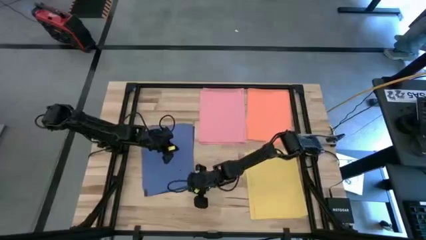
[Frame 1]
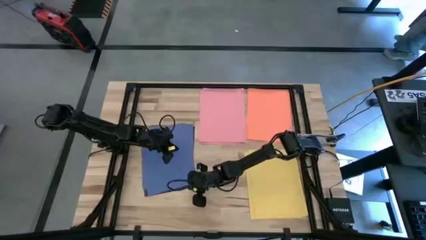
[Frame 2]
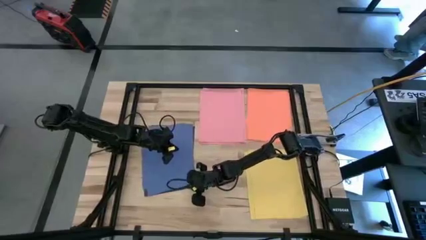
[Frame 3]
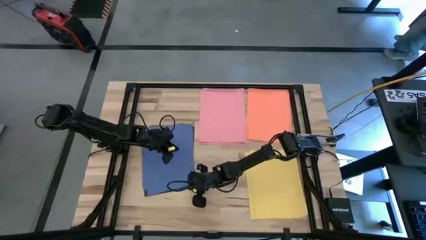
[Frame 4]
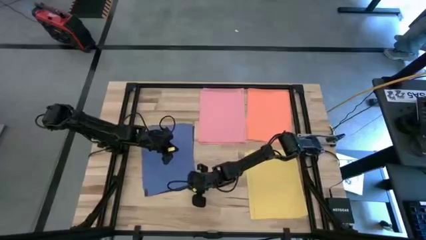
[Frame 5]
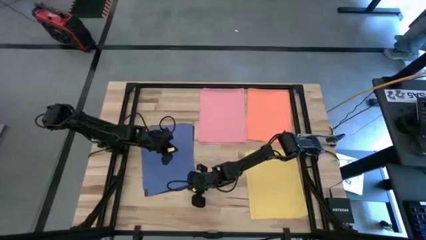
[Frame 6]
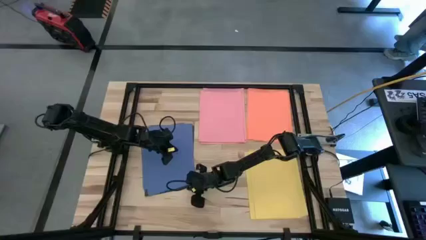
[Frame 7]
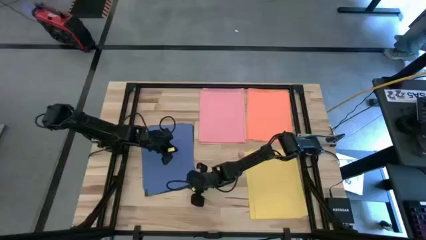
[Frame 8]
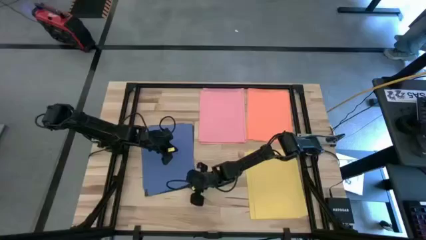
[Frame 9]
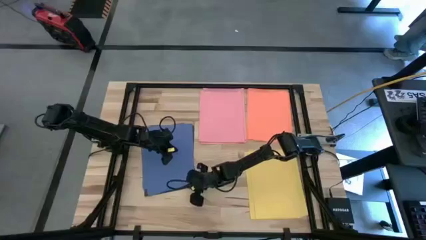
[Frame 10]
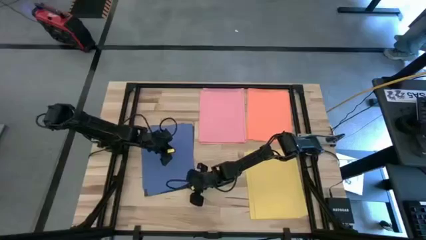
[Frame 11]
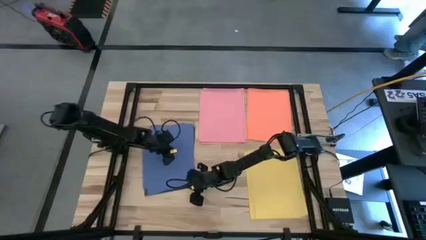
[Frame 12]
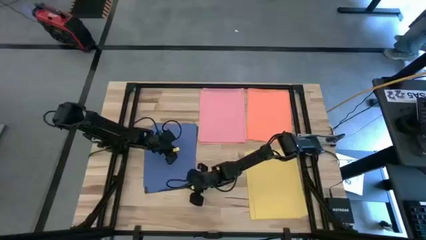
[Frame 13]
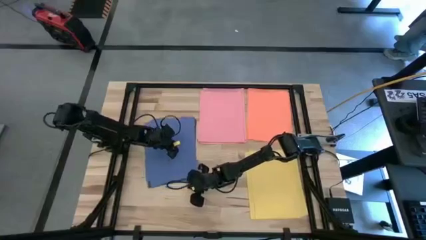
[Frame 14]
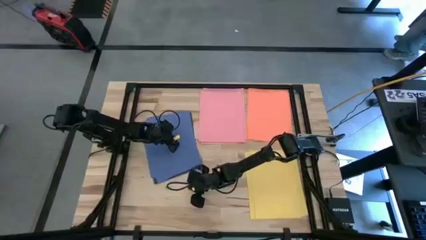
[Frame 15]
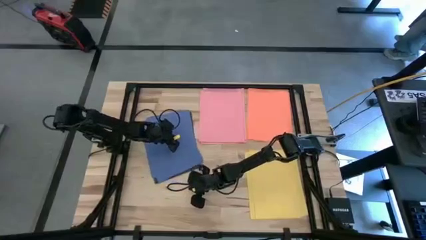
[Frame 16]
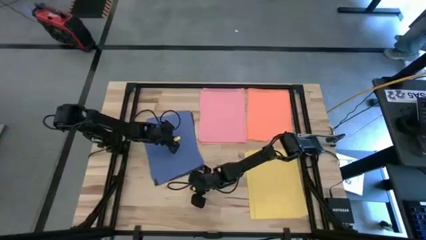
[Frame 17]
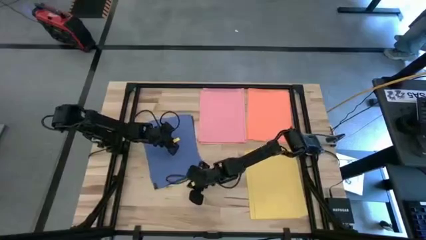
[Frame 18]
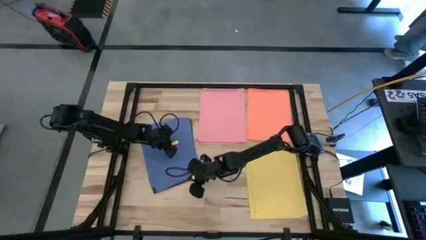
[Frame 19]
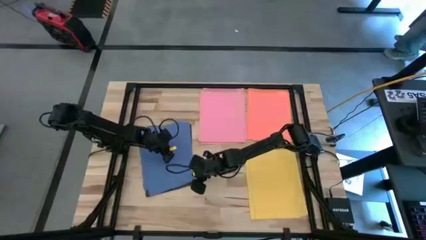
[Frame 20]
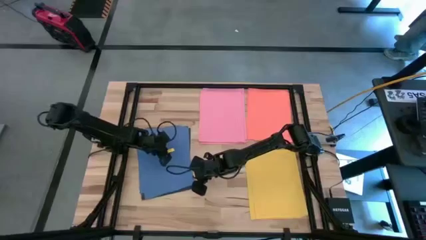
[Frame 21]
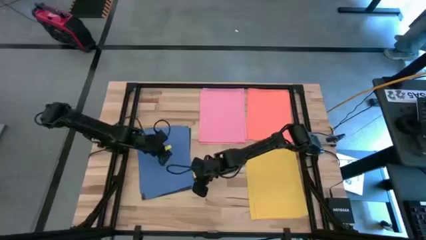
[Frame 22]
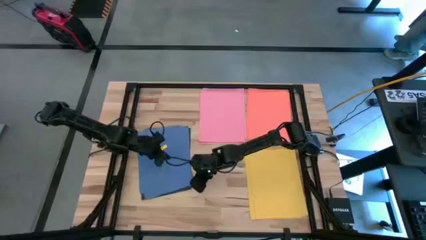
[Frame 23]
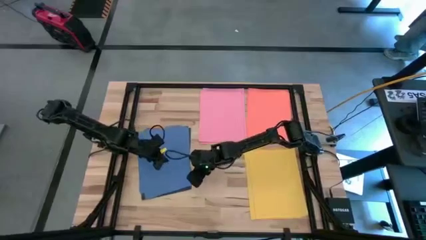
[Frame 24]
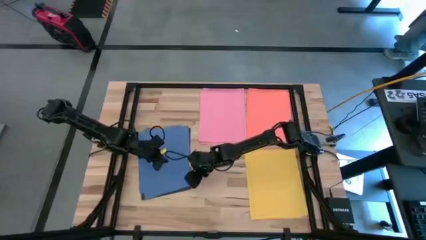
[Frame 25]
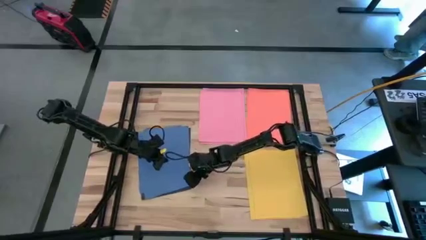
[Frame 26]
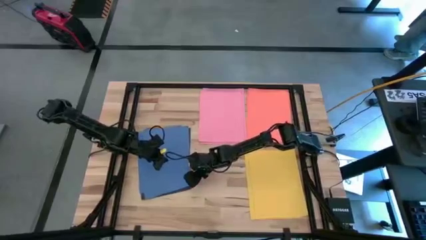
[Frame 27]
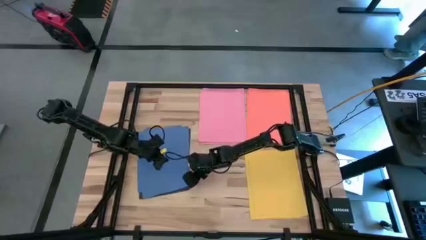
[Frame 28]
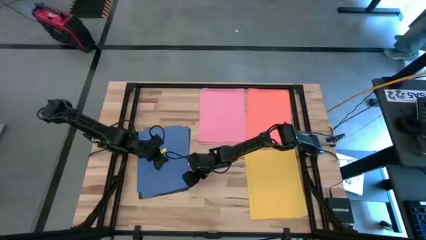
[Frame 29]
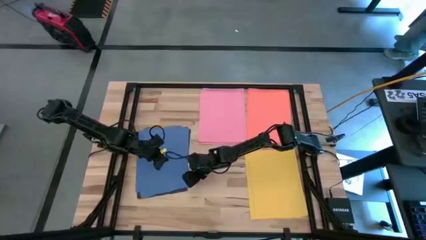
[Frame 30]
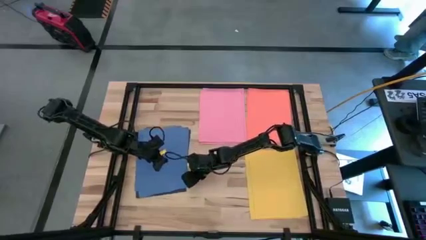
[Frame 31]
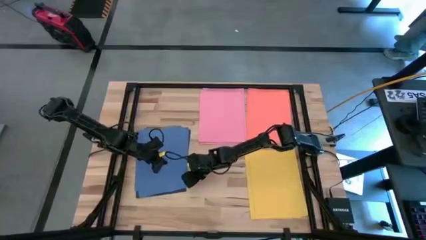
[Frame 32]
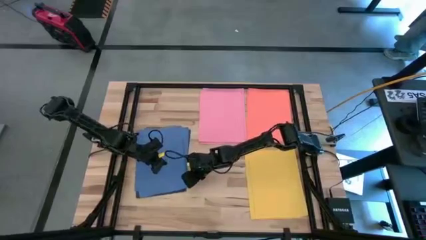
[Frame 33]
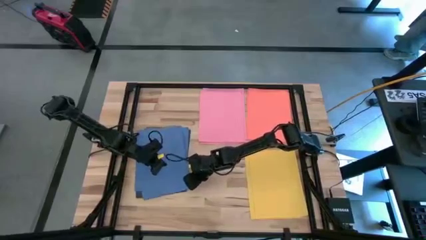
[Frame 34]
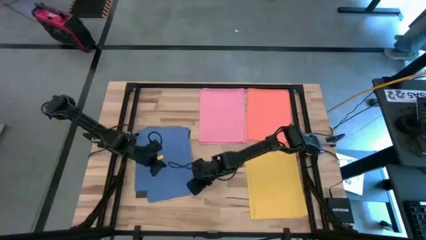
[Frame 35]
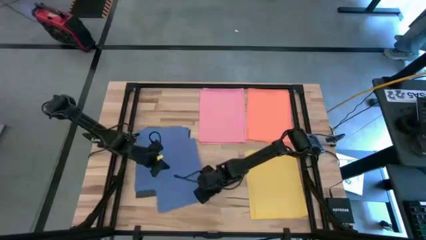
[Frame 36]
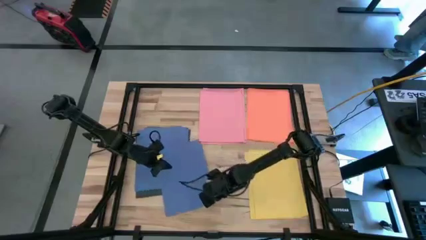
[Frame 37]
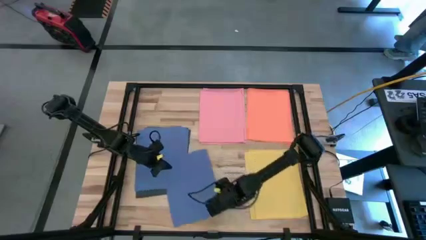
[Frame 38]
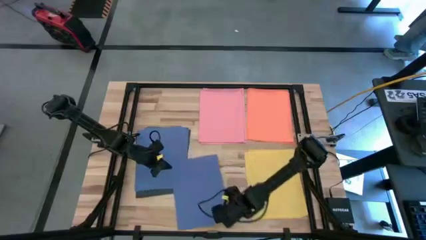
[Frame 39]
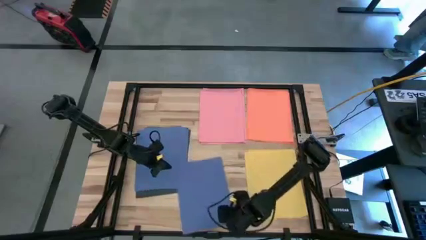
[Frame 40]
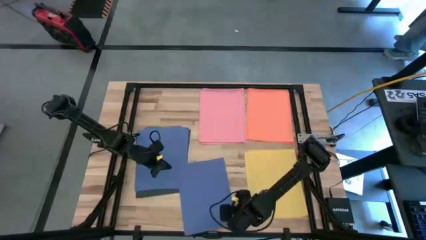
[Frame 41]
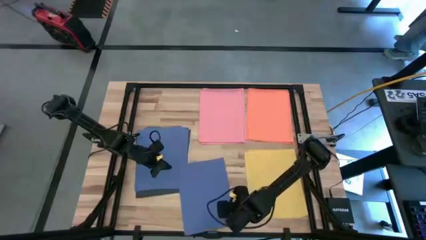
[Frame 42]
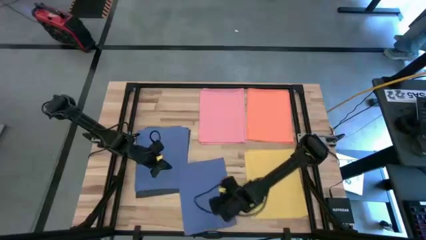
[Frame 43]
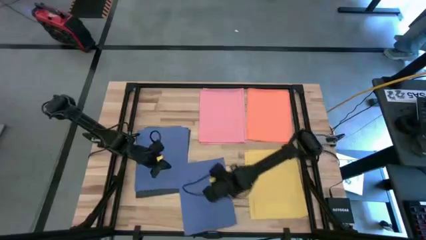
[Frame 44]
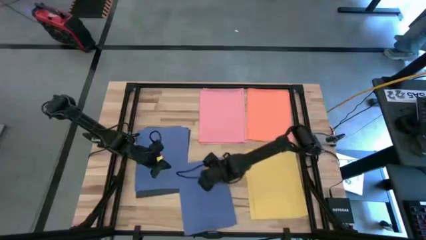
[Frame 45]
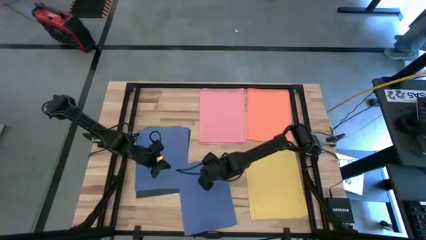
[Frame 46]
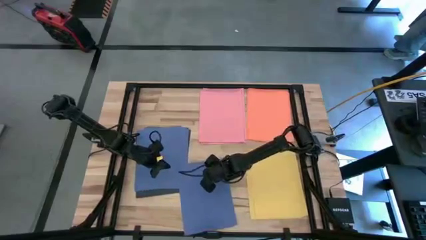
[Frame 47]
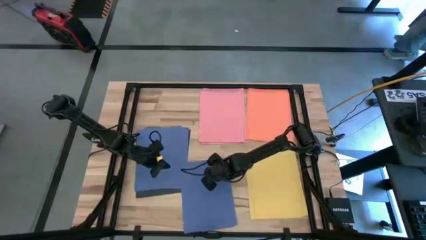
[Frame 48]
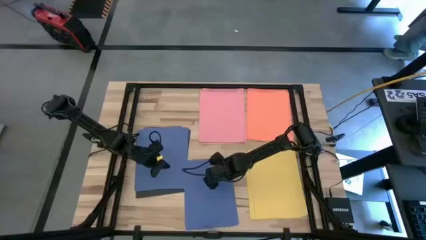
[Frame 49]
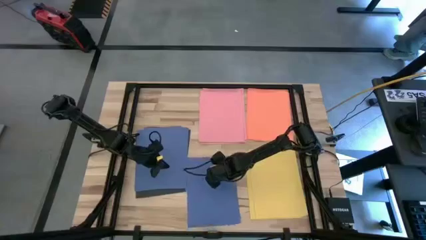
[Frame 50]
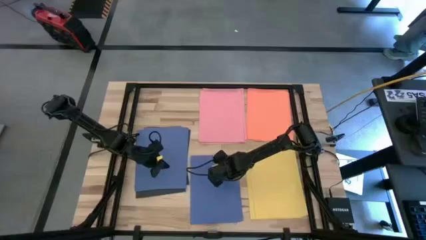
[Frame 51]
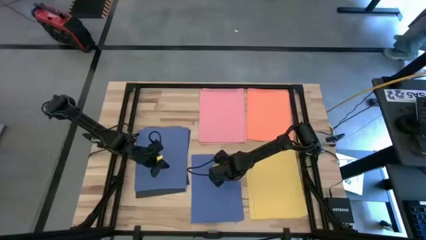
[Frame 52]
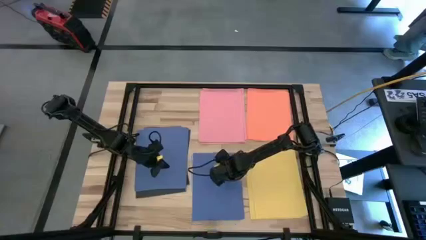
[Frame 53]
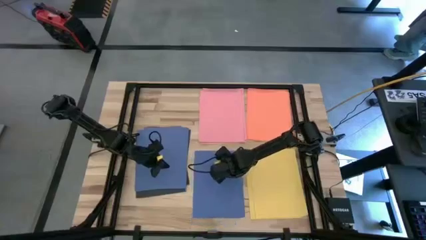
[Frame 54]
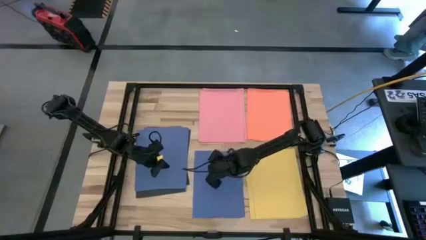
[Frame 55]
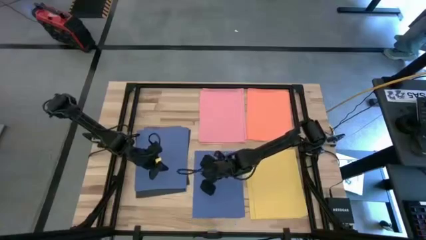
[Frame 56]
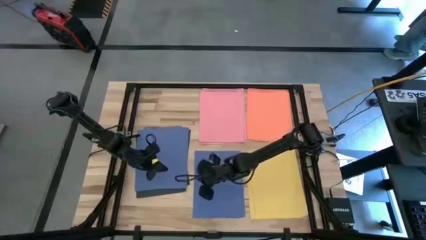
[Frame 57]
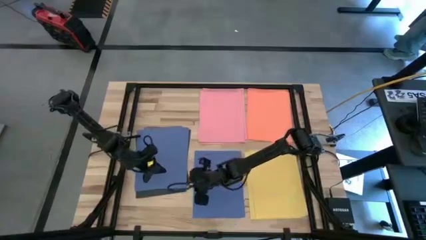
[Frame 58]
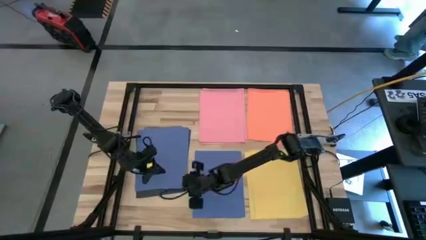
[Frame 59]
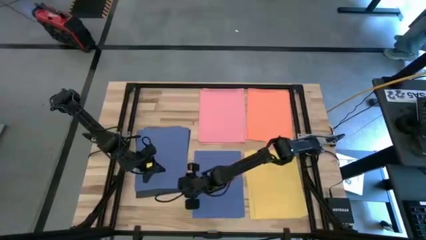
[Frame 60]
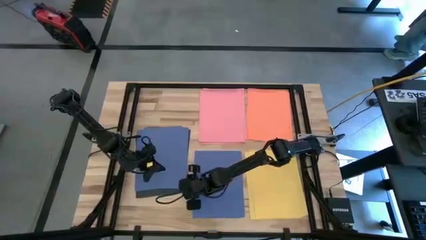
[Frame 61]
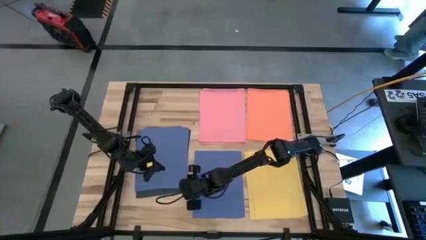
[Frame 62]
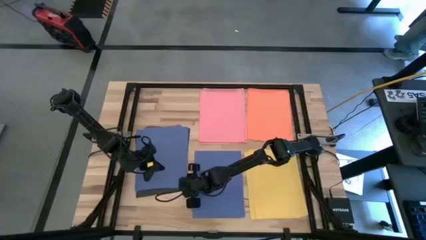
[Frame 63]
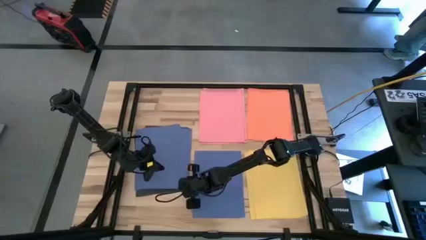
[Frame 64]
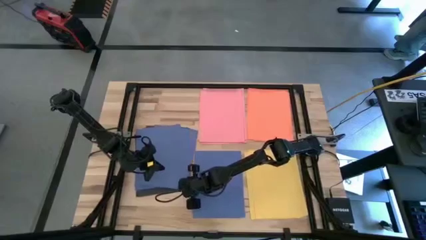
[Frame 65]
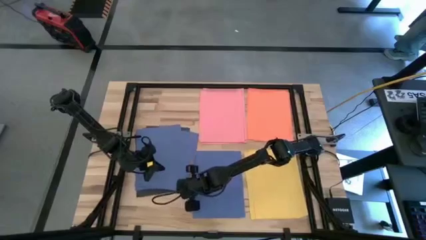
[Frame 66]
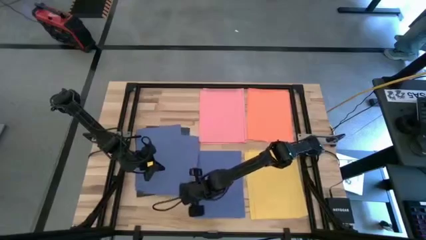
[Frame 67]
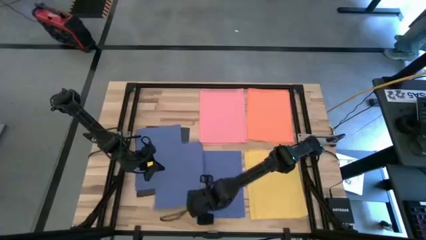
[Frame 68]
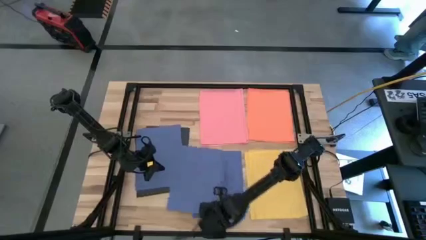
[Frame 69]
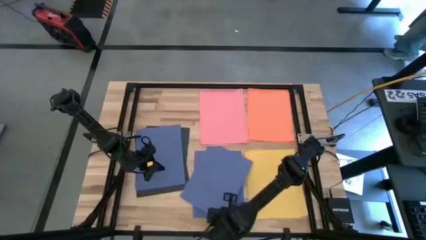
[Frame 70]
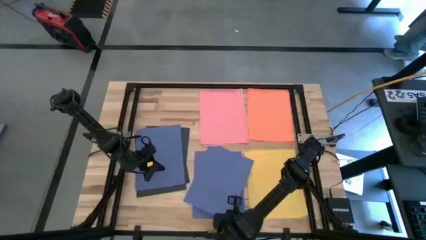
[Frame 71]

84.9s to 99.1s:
Task: Organize paper
Put all of the blue paper at the lower center of the table

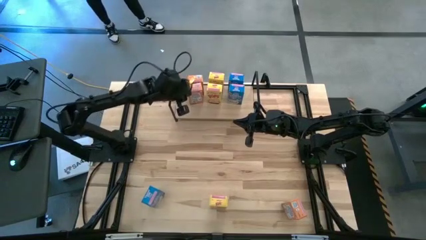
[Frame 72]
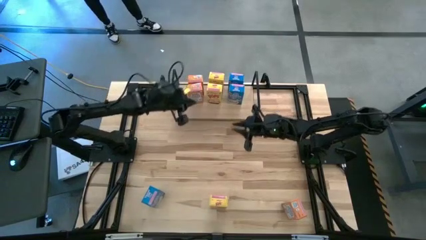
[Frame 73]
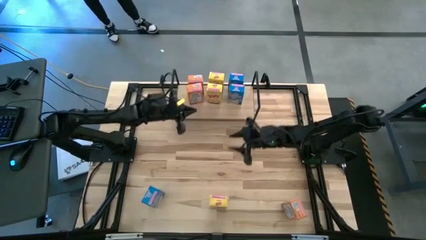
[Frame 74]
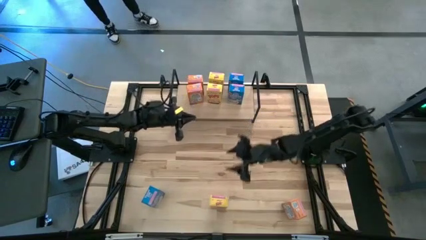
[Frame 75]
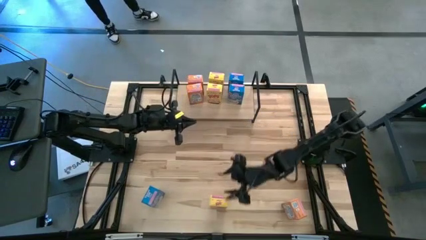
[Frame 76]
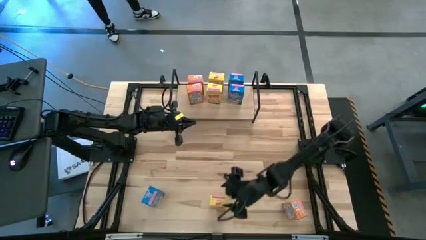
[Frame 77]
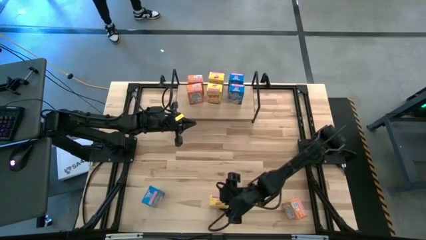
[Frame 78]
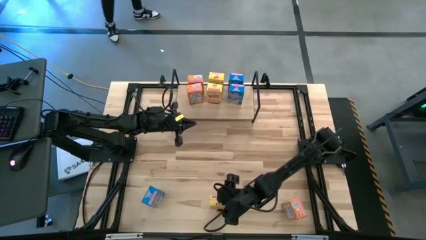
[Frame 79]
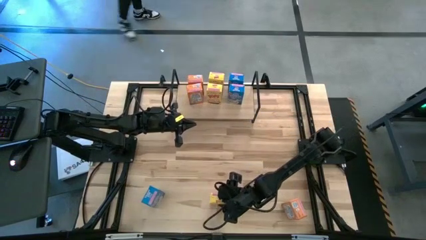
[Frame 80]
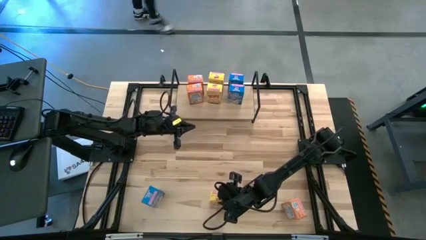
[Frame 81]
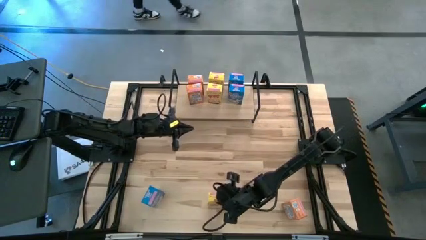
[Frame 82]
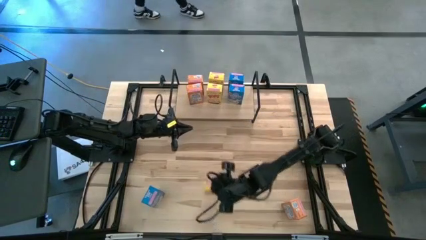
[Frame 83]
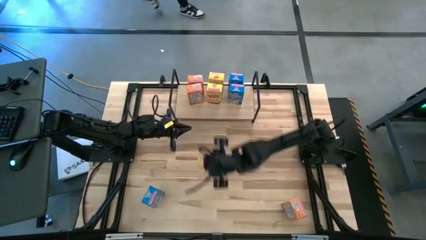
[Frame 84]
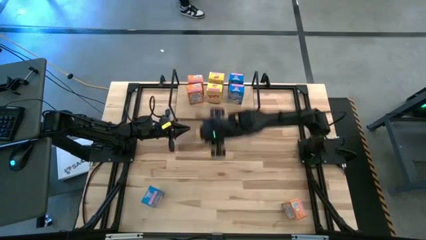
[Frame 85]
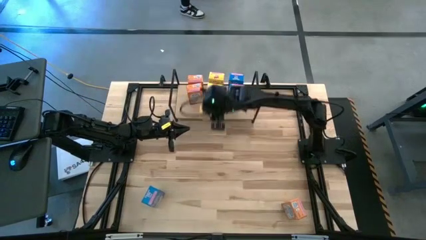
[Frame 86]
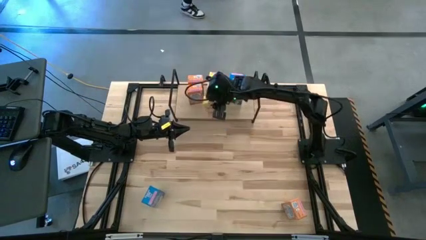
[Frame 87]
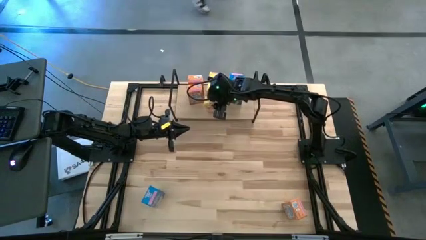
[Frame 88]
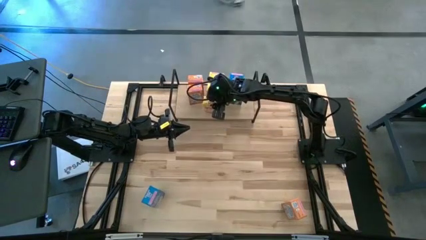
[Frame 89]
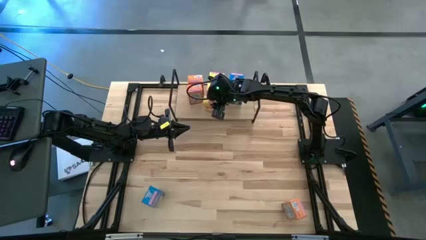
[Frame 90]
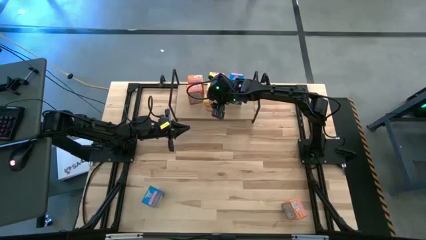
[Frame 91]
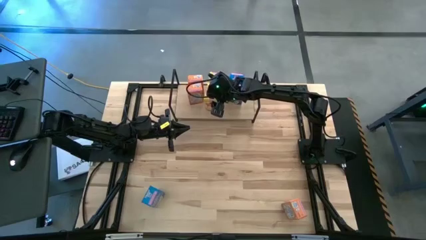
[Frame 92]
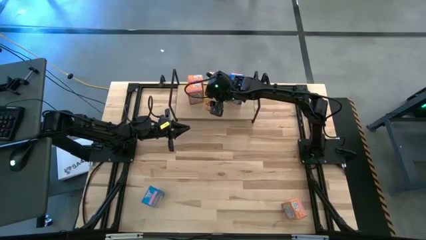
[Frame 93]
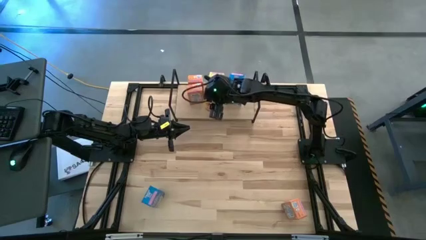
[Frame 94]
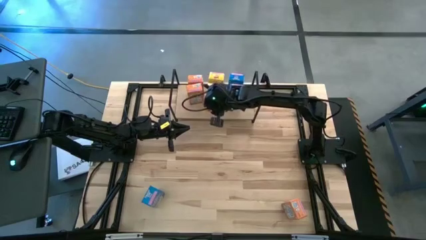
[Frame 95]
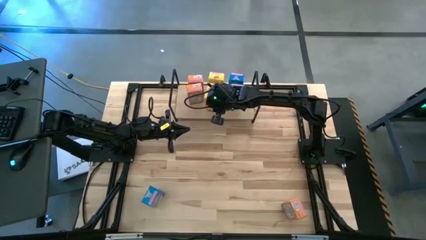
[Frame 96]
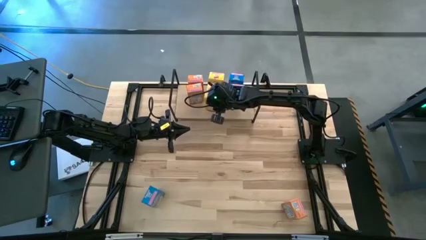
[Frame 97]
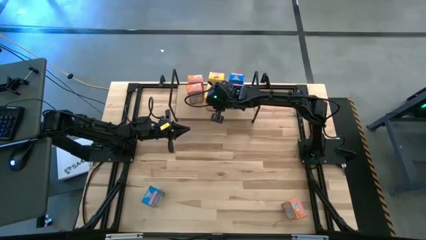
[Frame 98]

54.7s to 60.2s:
Task: Stack cereal on shelf
Put the yellow cereal box on the shelf aligned with the other yellow cereal boxes
